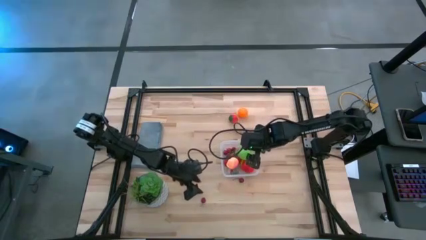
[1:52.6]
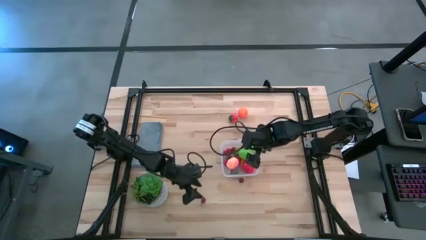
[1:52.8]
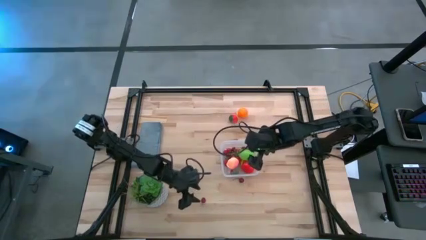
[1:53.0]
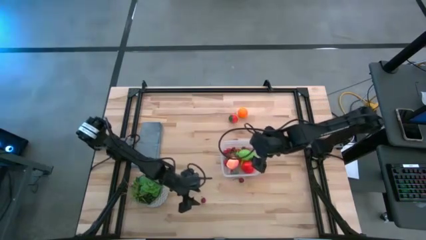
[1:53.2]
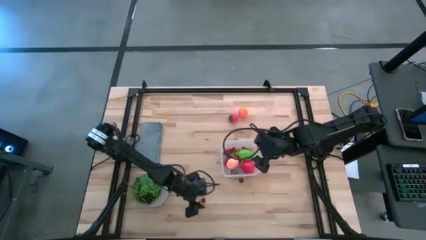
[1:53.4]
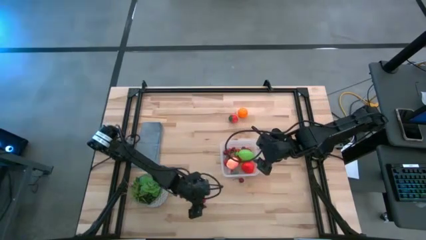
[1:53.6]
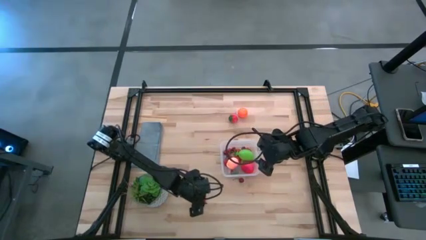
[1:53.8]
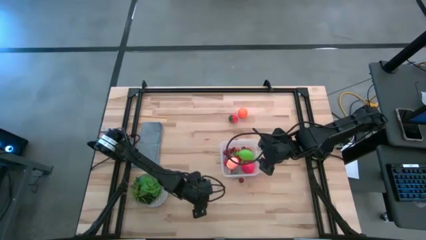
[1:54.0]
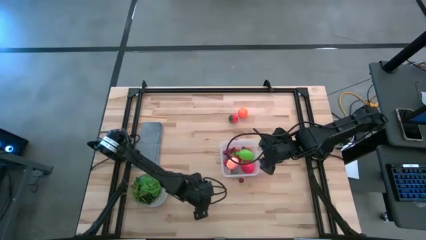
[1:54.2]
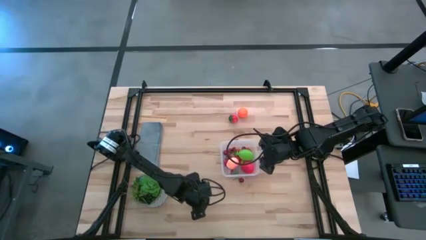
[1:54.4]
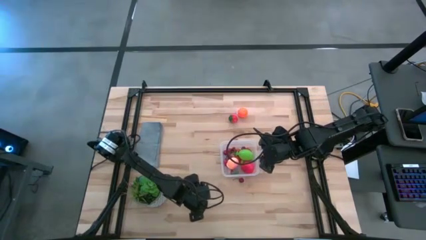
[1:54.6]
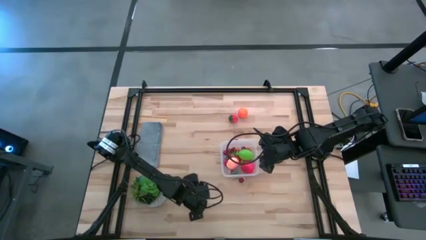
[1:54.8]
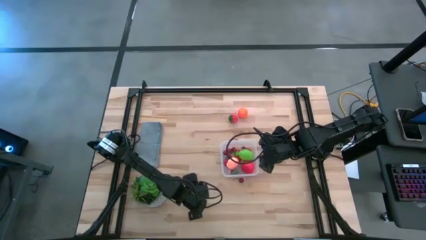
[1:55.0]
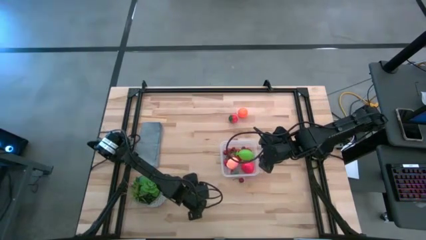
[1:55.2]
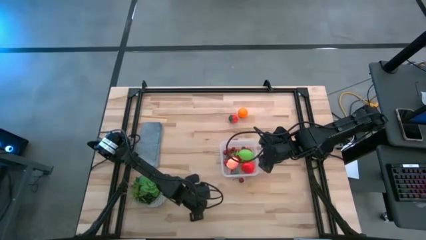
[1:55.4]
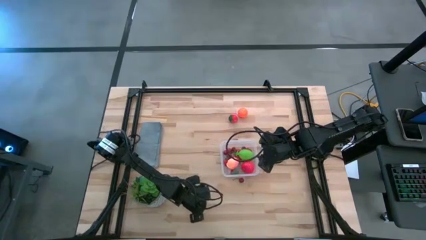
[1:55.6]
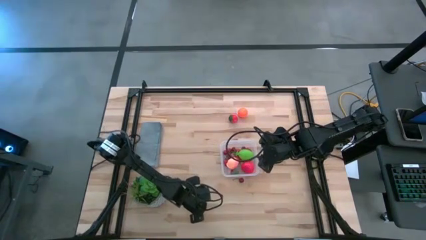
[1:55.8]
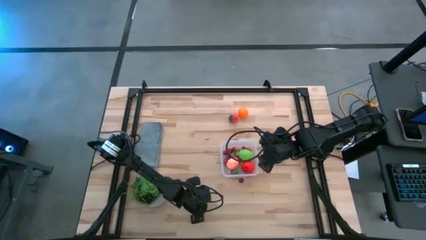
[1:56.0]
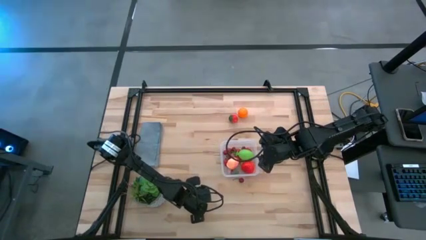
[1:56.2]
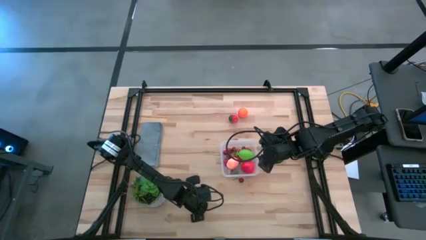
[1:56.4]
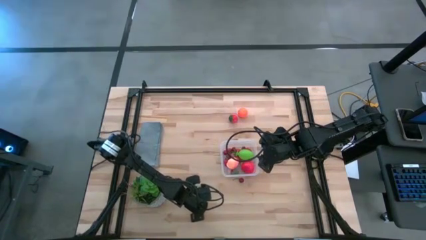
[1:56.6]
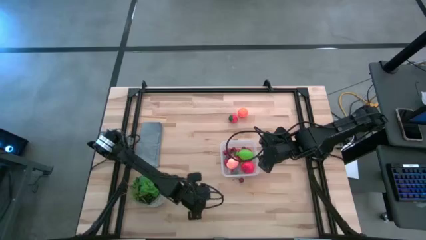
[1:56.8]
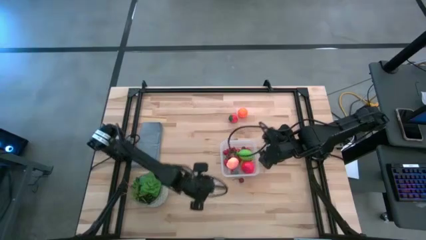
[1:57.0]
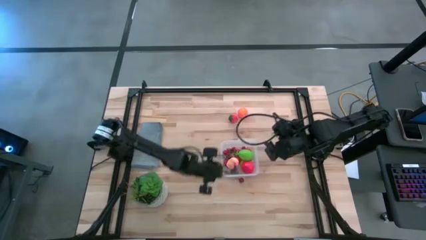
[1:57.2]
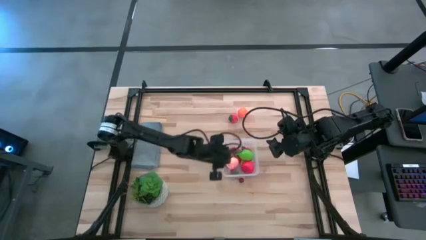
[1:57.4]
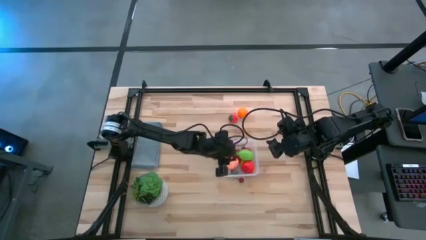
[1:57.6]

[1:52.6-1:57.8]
Task: Pick and placing Produce into tupperware
Put the bottom cherry into the transparent bin

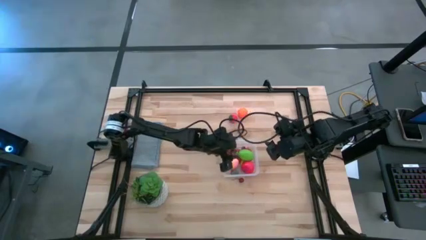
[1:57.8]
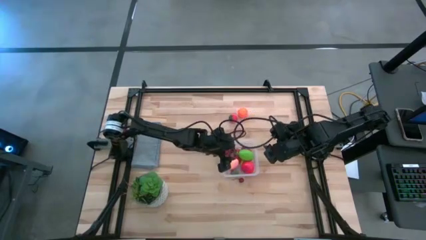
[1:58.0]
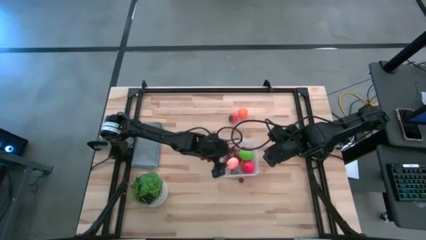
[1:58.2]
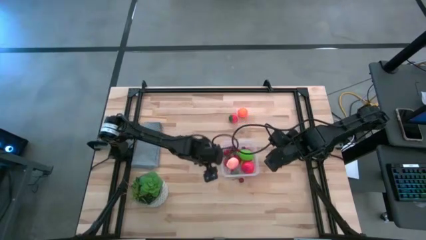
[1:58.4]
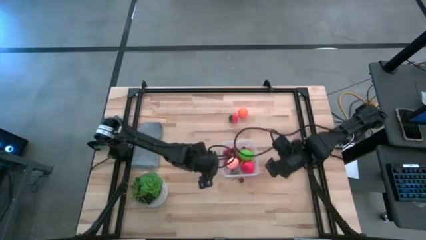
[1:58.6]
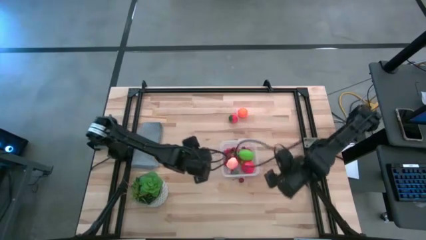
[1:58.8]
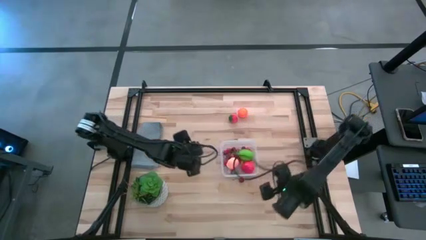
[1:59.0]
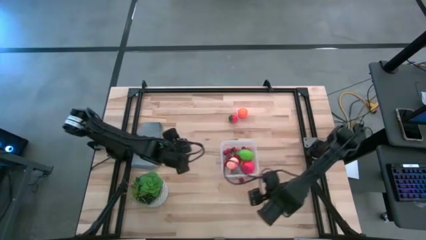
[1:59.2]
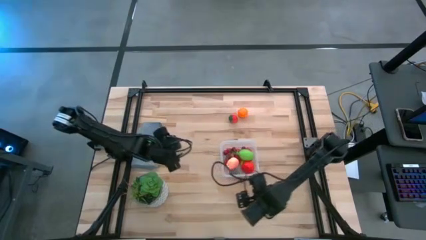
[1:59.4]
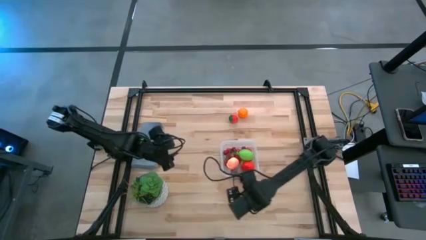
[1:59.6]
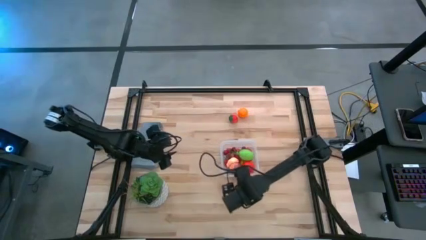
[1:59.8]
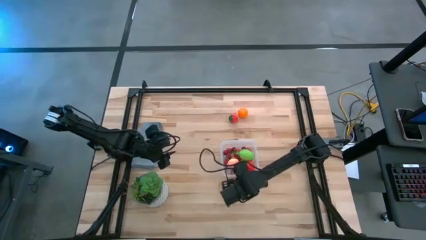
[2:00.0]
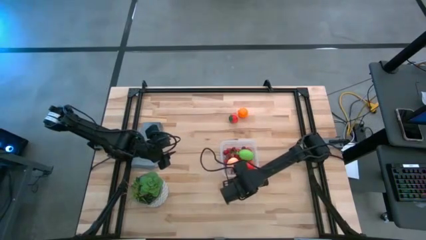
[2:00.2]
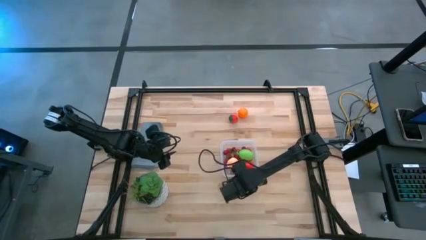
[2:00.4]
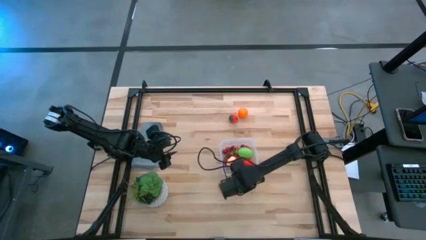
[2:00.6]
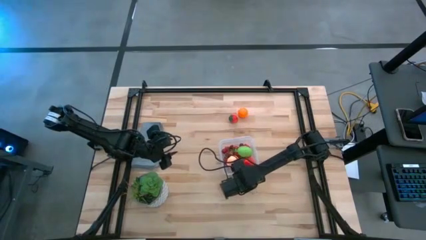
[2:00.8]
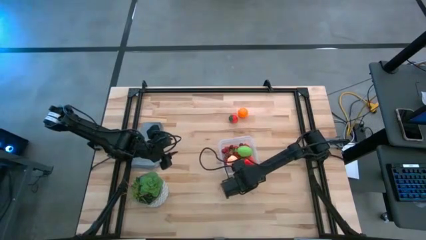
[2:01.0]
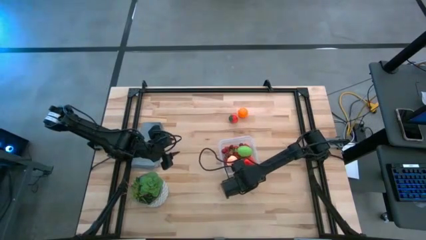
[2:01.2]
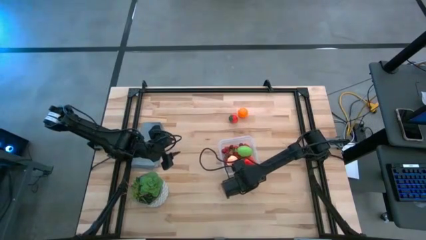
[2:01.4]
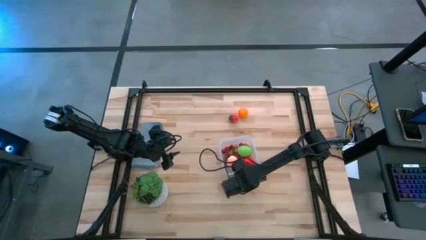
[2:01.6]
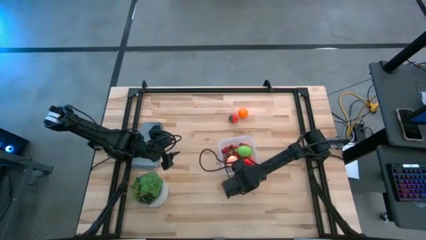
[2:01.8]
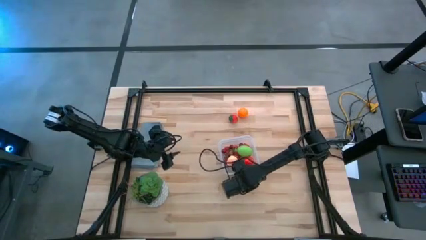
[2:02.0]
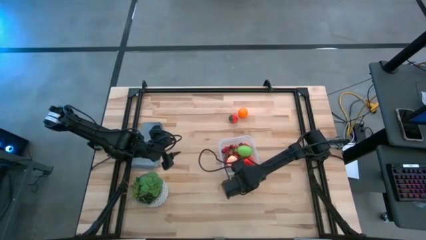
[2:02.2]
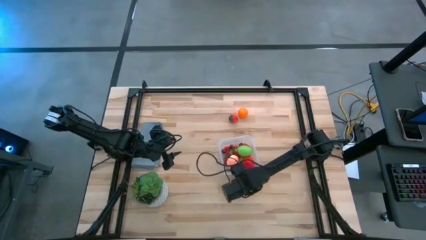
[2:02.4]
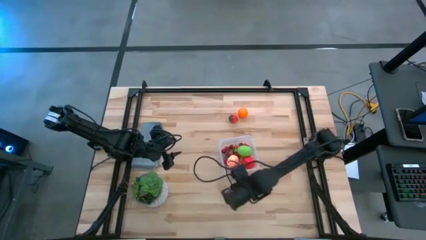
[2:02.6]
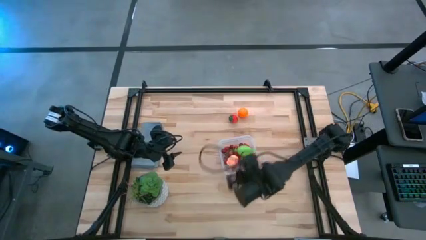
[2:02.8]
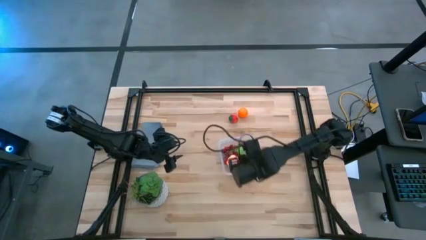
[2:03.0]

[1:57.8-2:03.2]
Put the cherry into the transparent bin

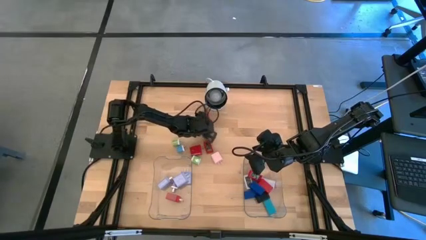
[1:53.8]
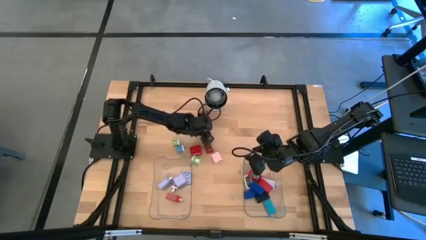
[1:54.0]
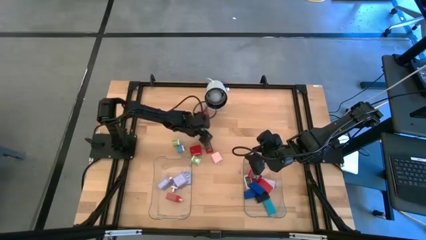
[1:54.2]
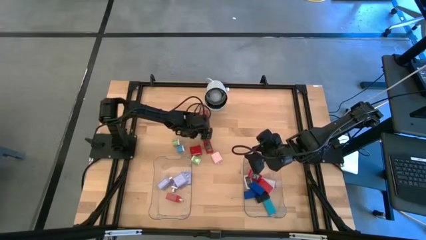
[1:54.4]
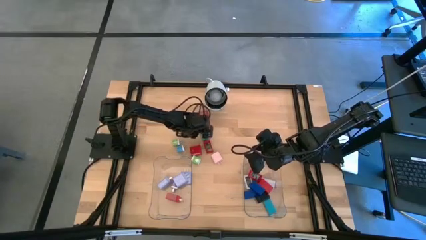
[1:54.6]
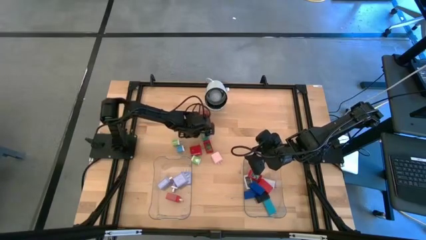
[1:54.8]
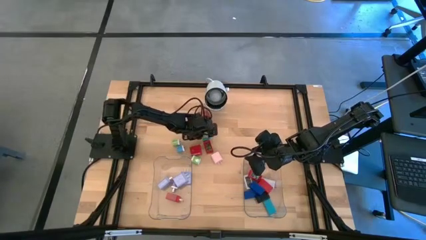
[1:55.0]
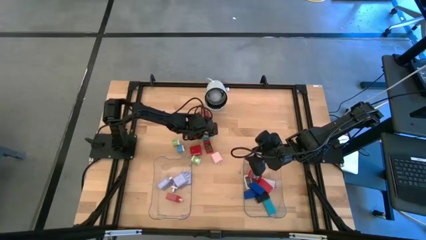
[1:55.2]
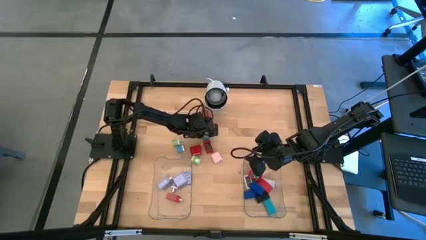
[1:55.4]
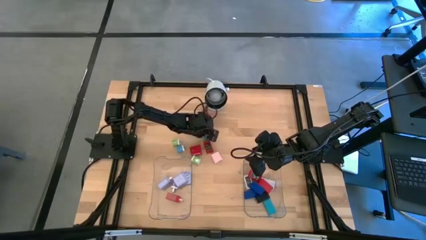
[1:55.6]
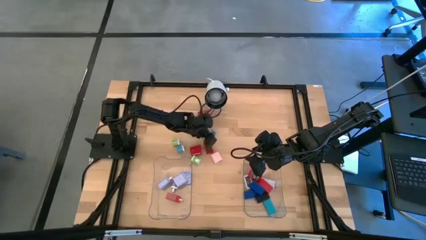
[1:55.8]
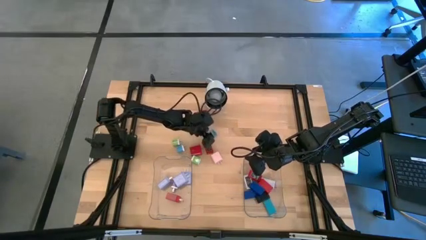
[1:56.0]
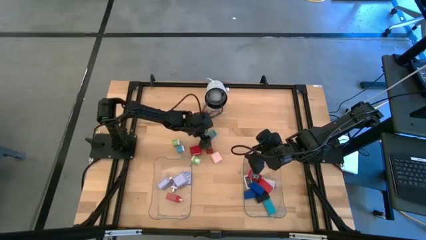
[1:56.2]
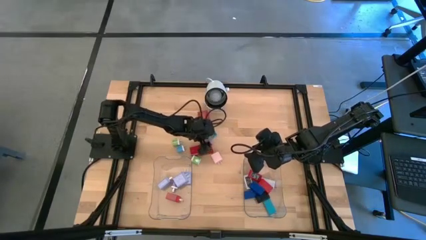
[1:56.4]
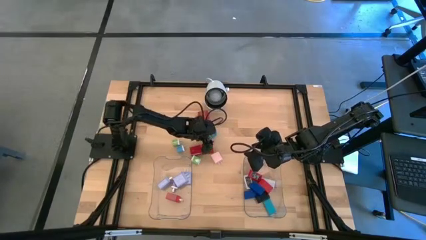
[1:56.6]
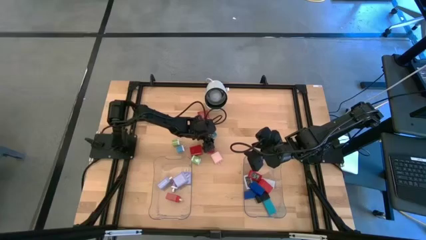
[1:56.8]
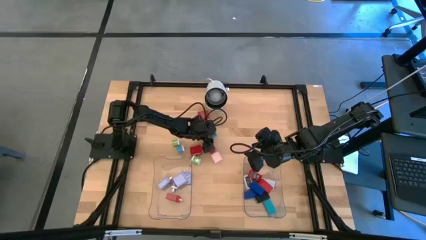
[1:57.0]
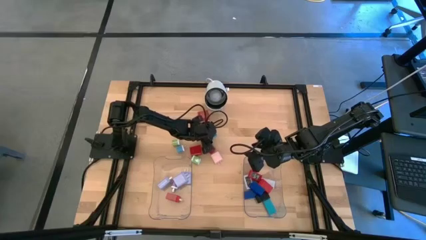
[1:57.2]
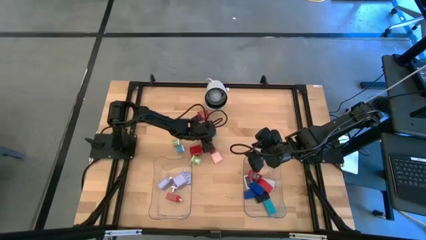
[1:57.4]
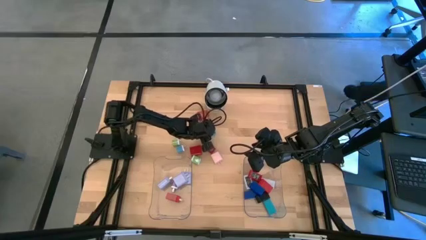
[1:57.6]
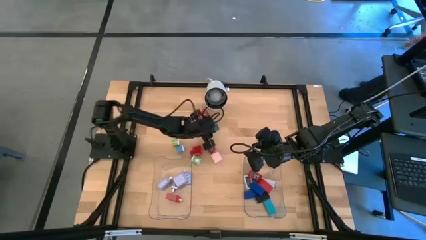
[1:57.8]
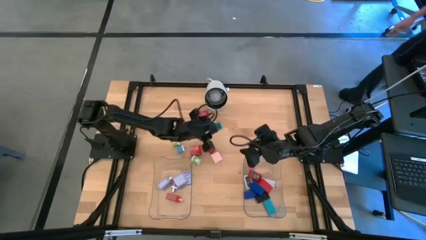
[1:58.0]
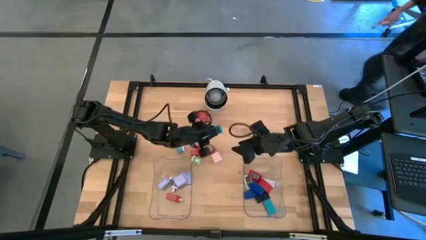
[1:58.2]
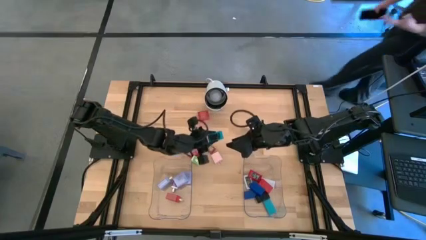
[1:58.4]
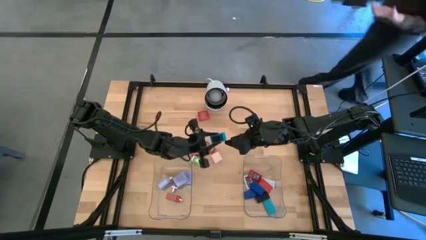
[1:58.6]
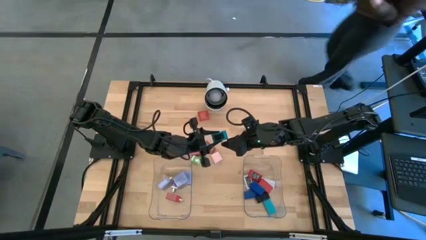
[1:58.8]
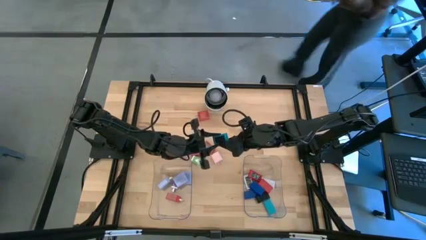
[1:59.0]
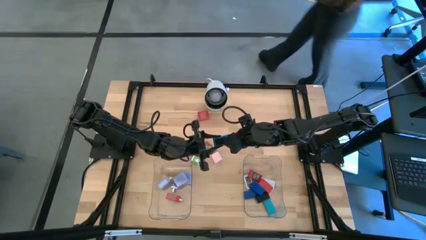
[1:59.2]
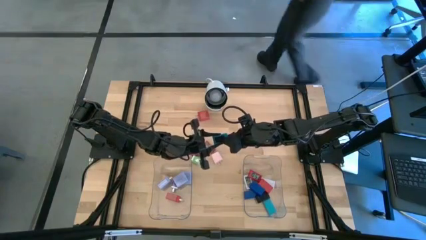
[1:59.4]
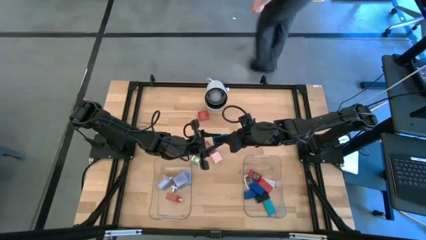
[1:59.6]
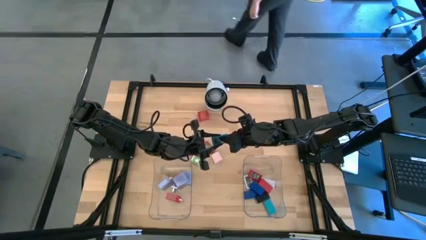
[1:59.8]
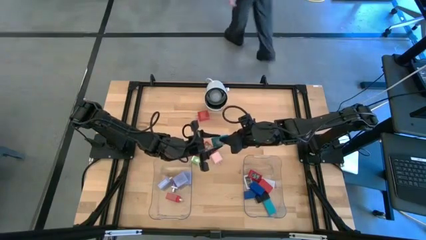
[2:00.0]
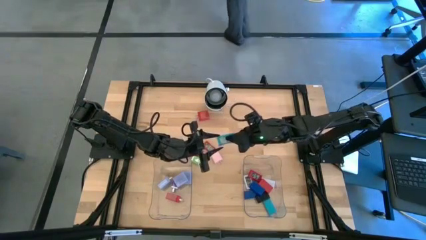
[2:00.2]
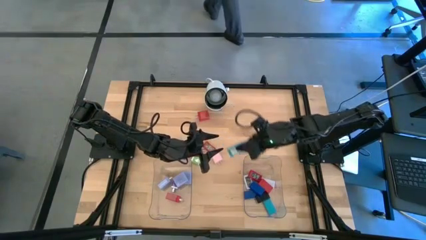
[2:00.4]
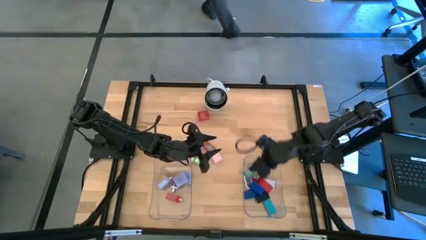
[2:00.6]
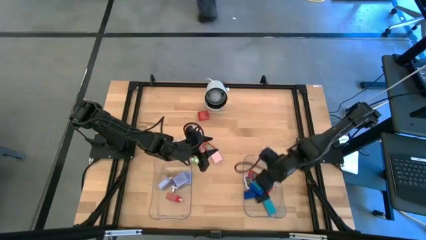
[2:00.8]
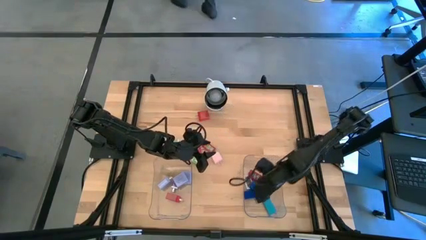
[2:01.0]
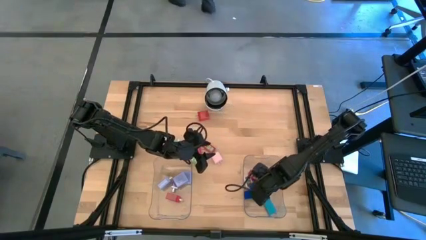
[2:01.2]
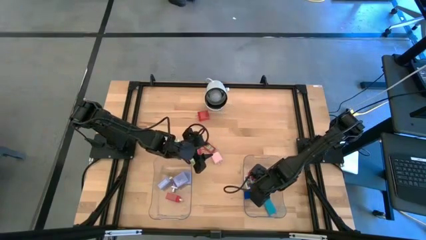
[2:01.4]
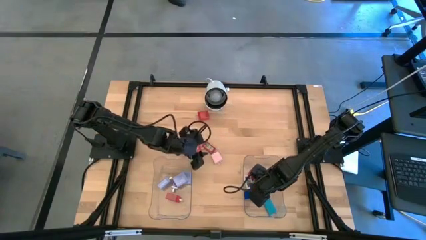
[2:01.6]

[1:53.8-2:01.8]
Task: Pick & Place Office items
Put the light blue timer into the right transparent bin
